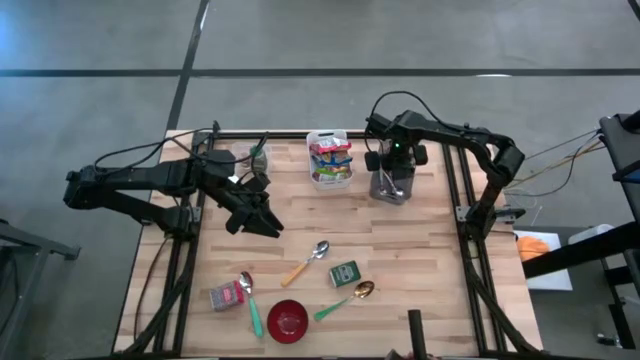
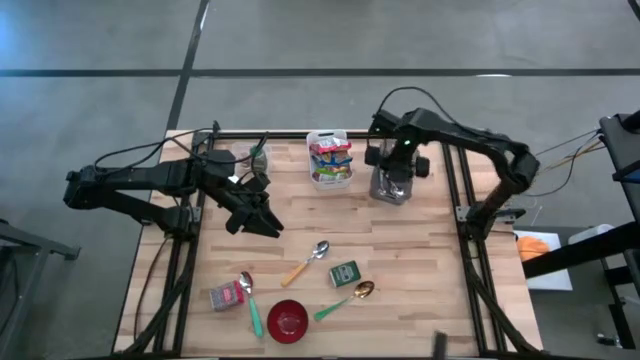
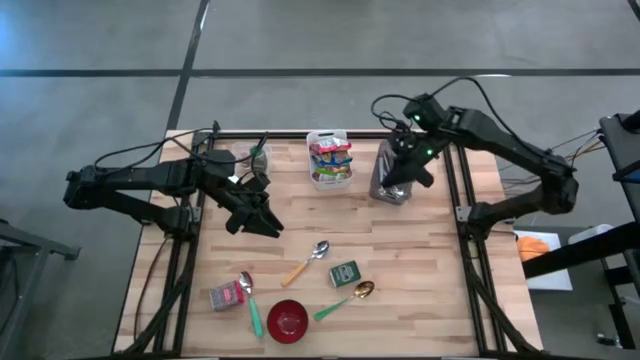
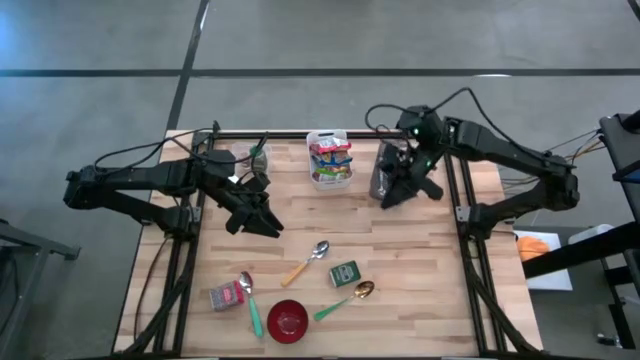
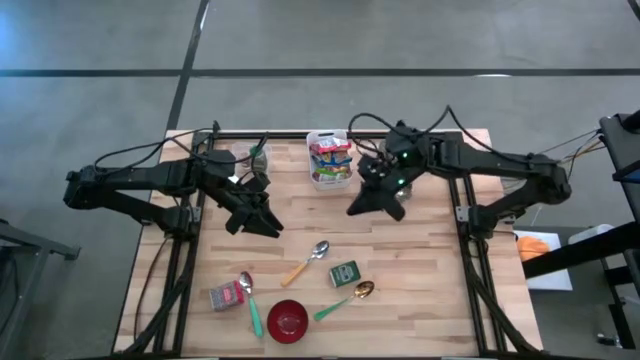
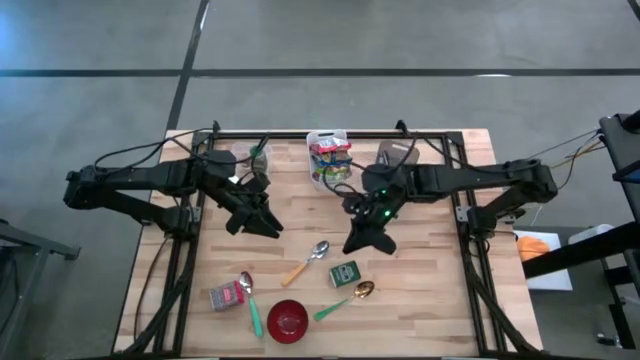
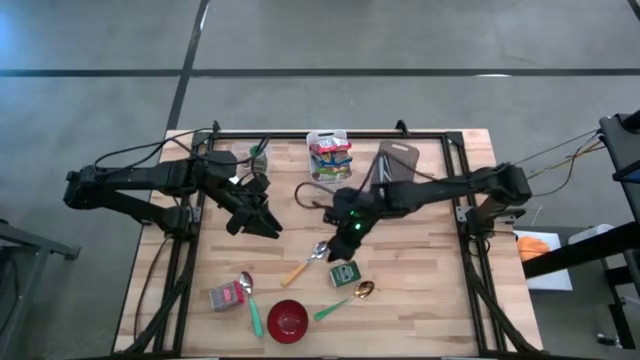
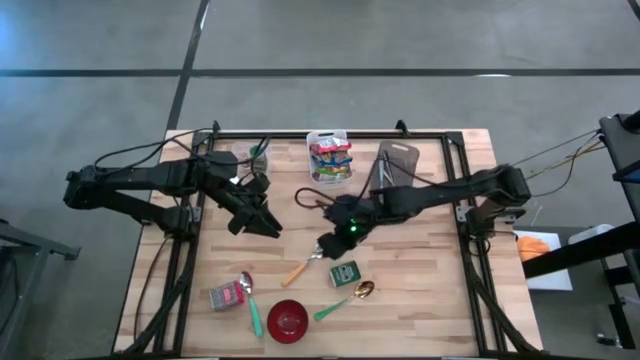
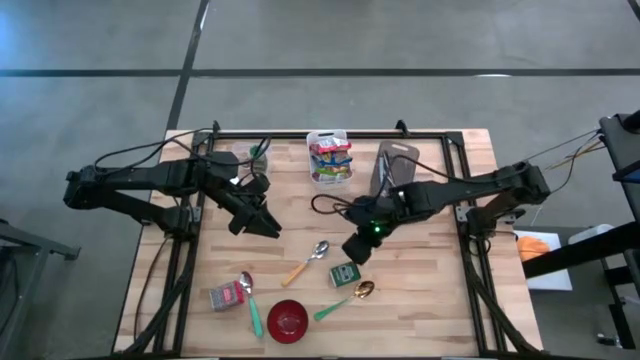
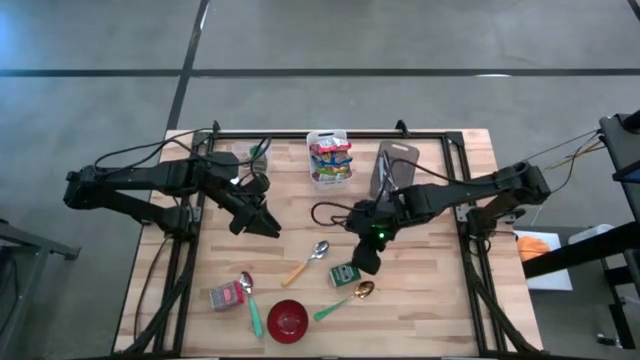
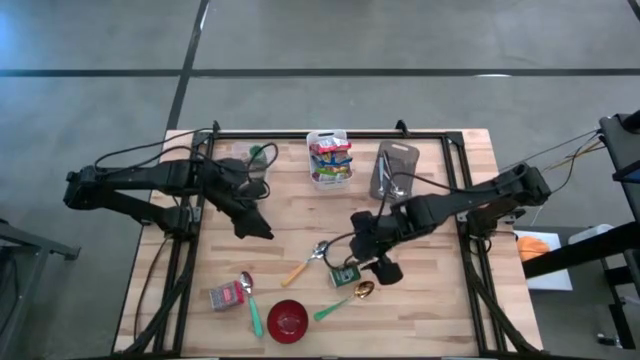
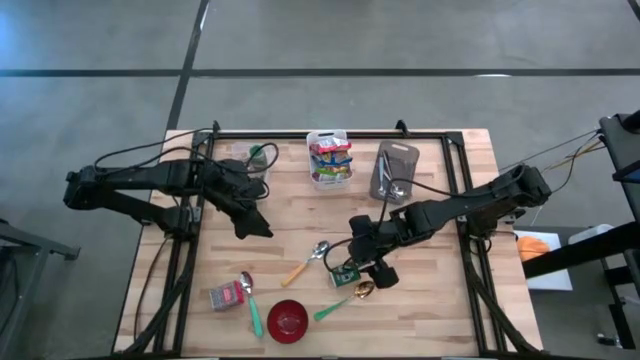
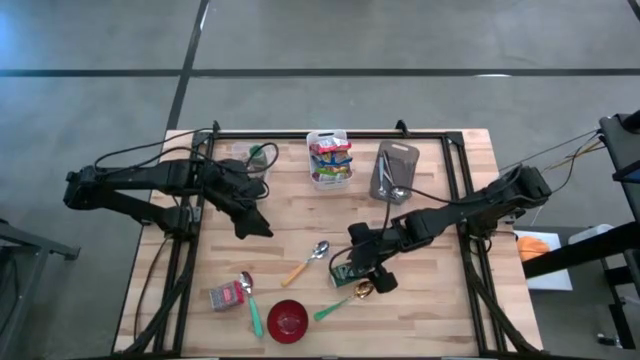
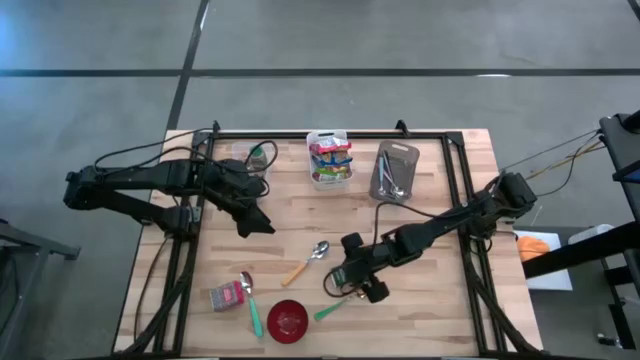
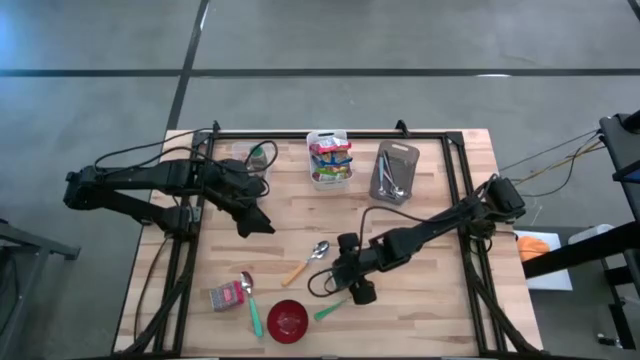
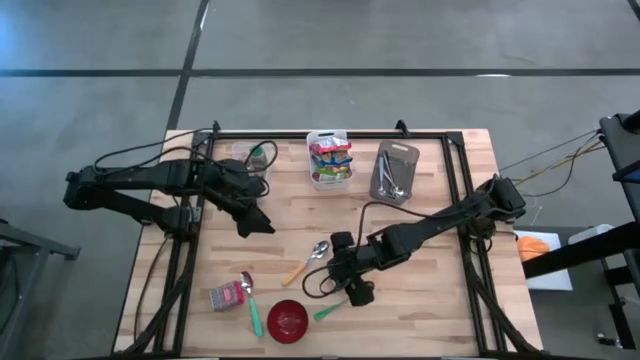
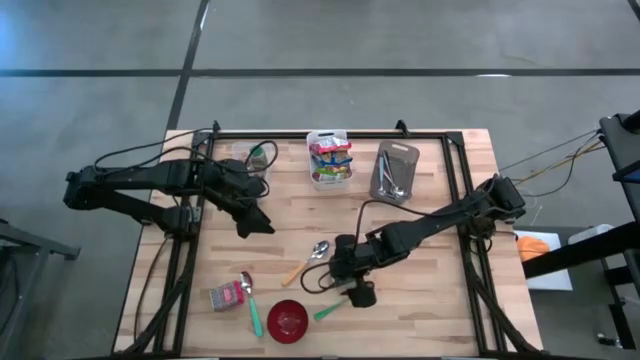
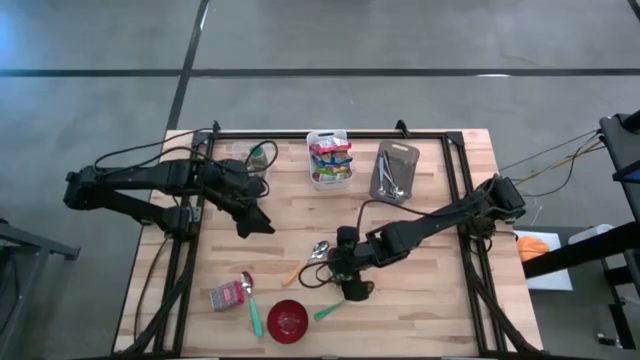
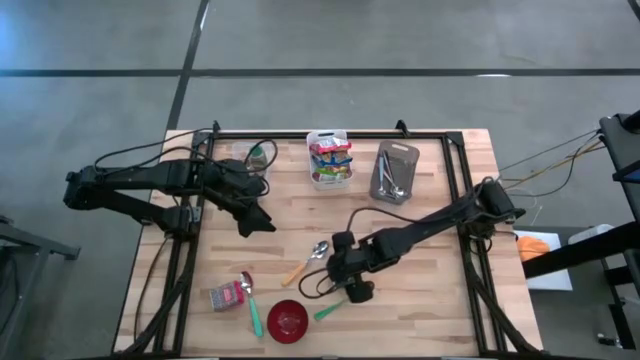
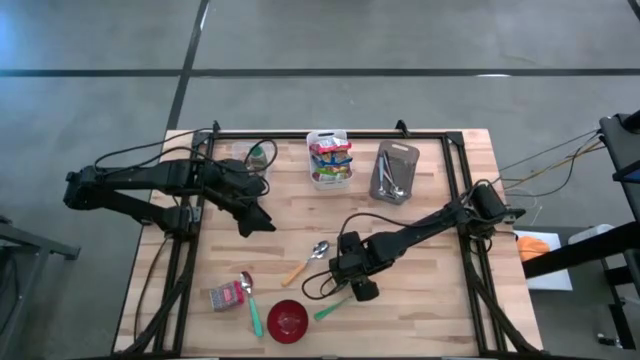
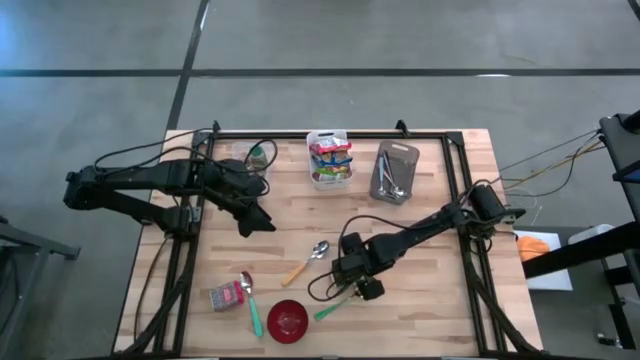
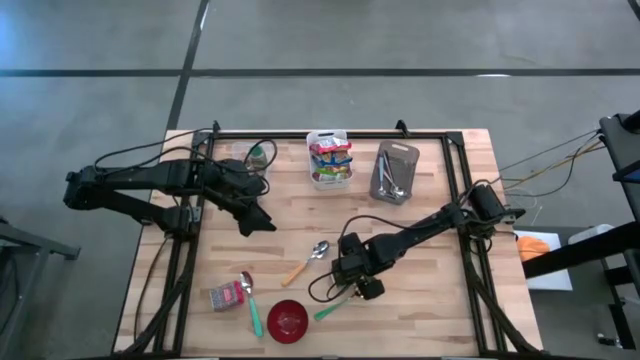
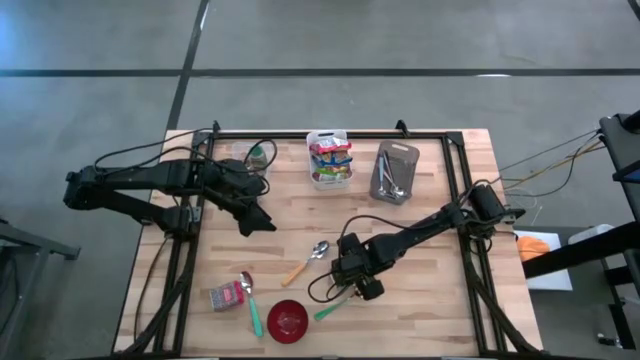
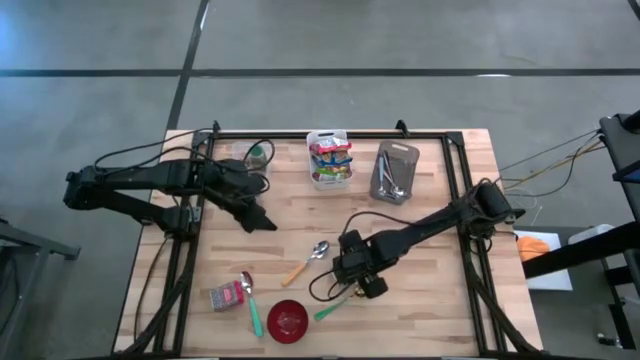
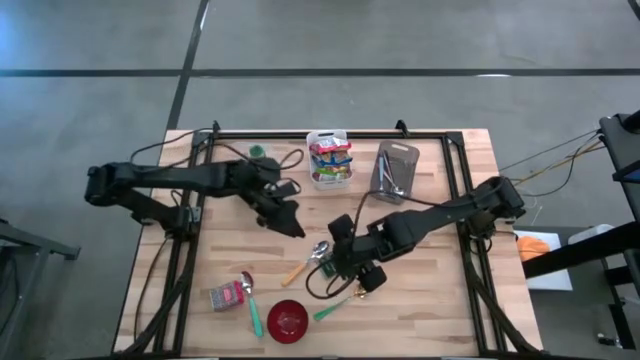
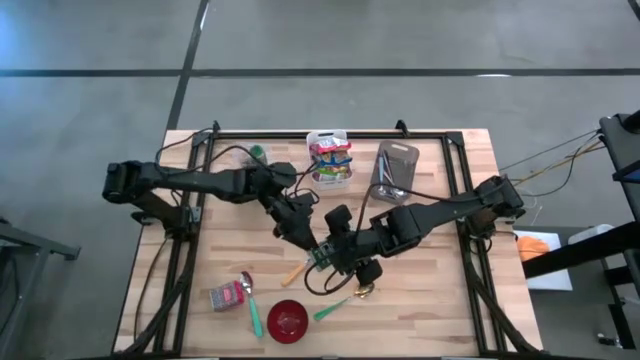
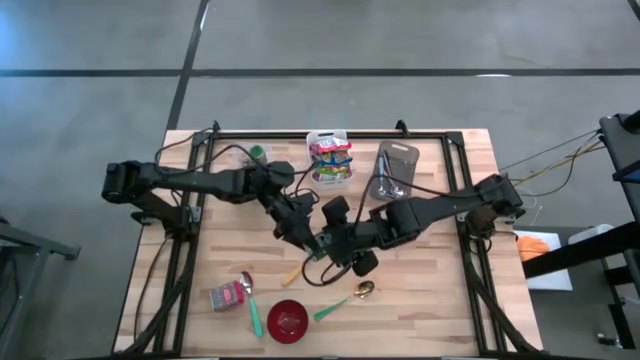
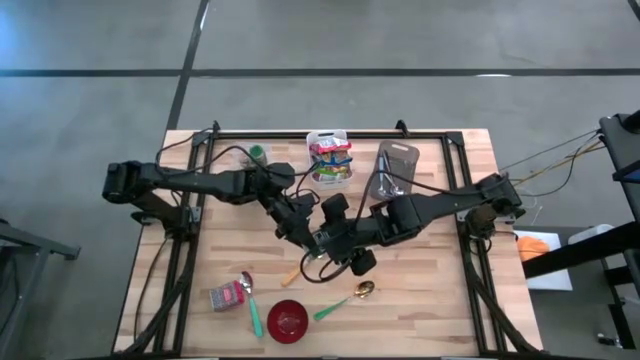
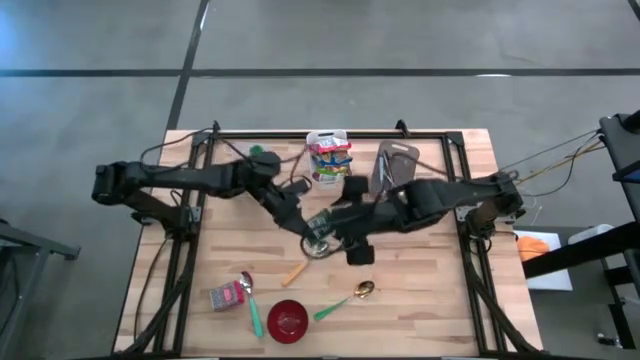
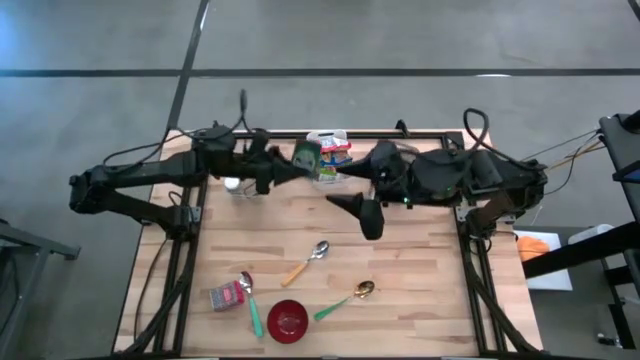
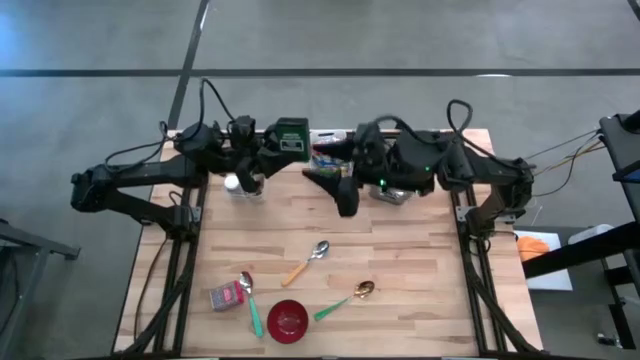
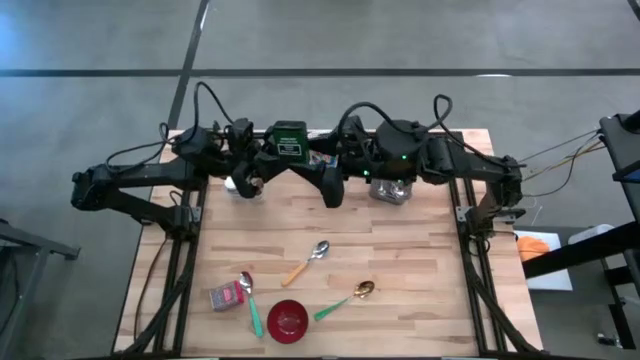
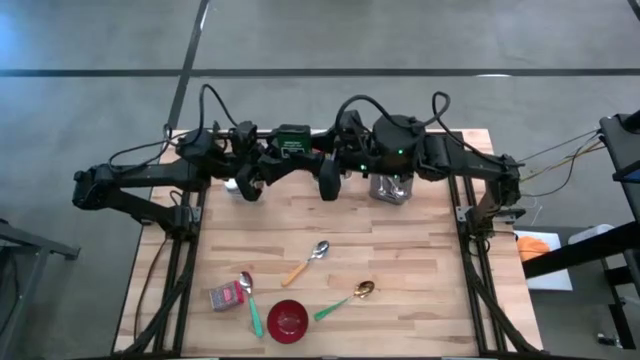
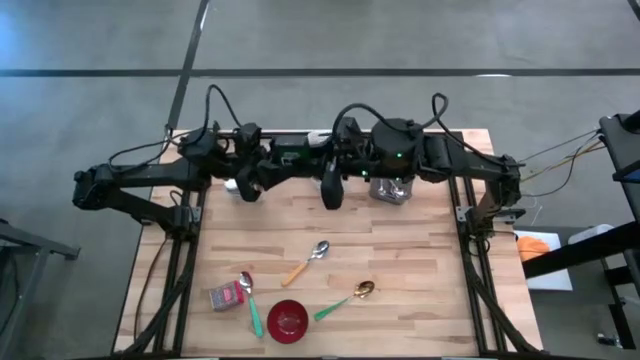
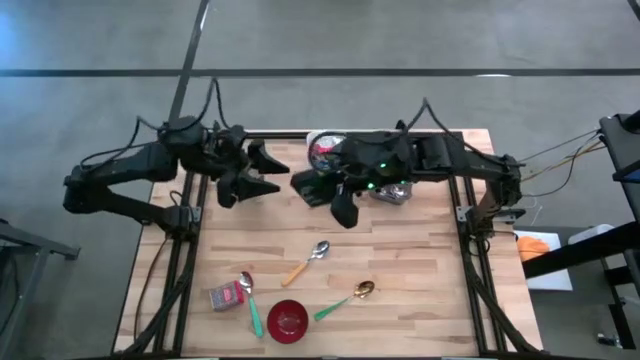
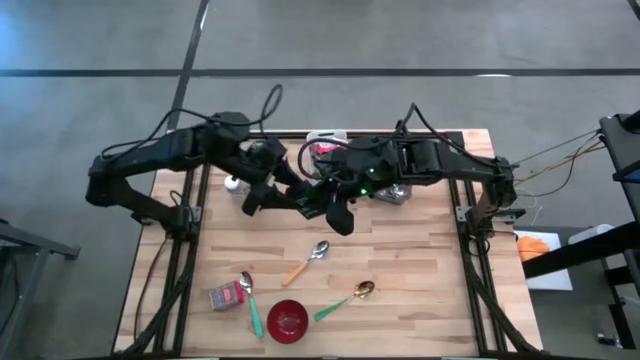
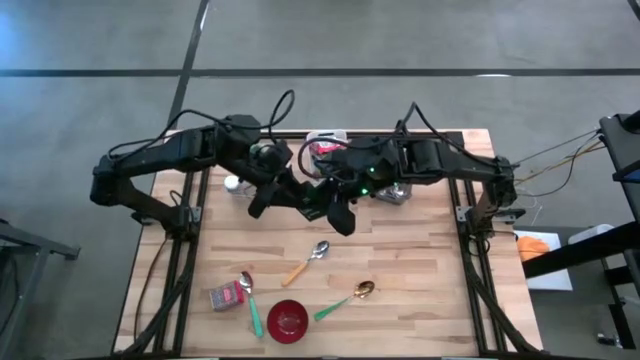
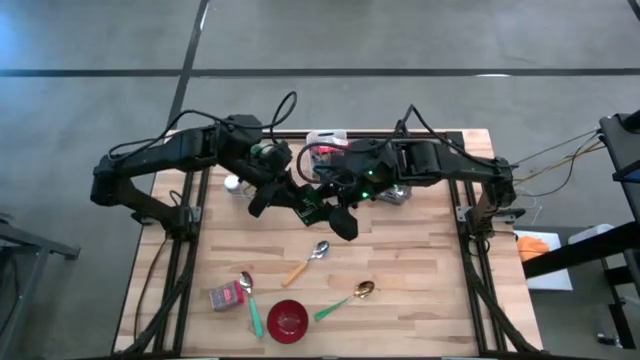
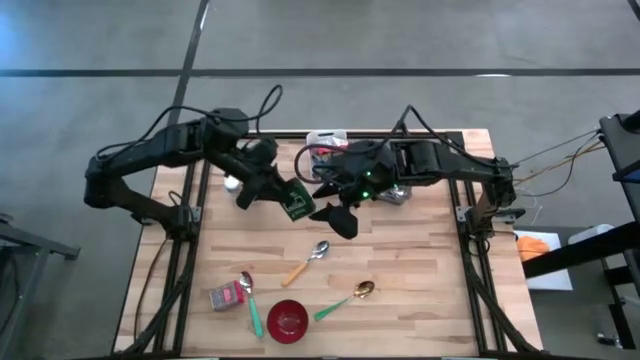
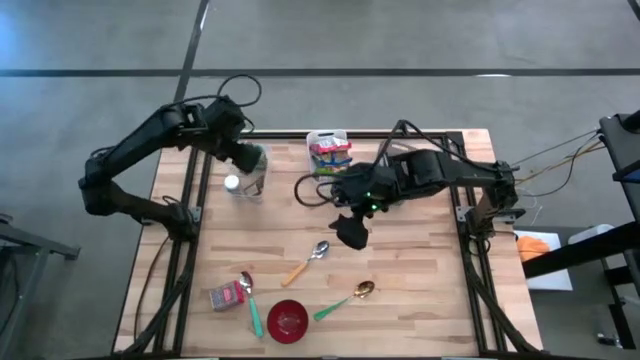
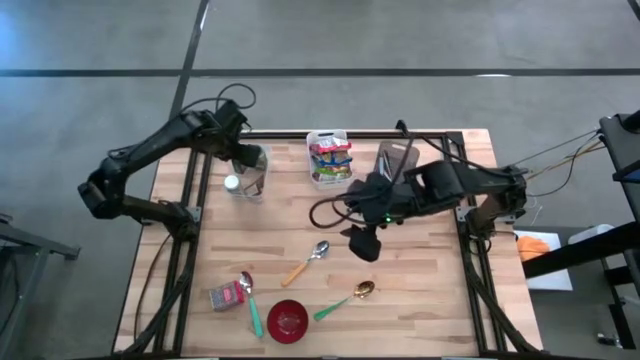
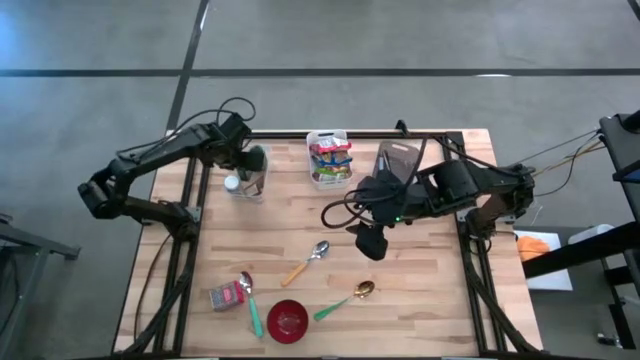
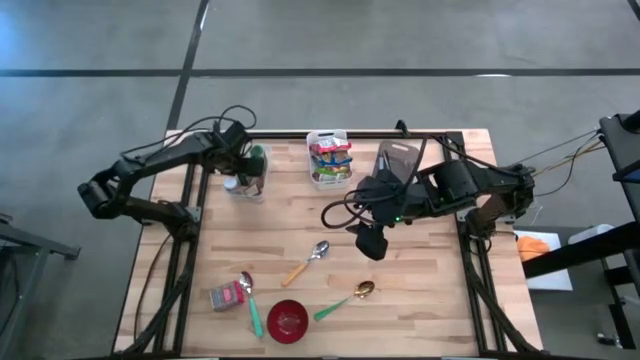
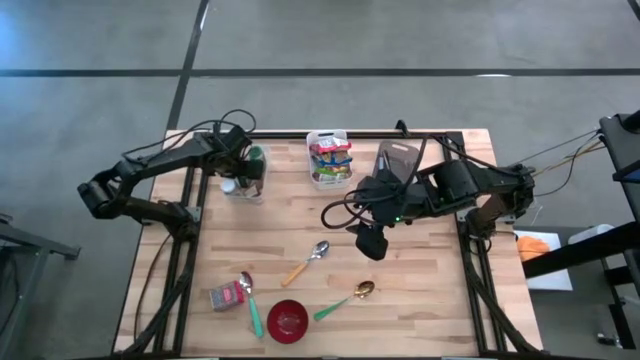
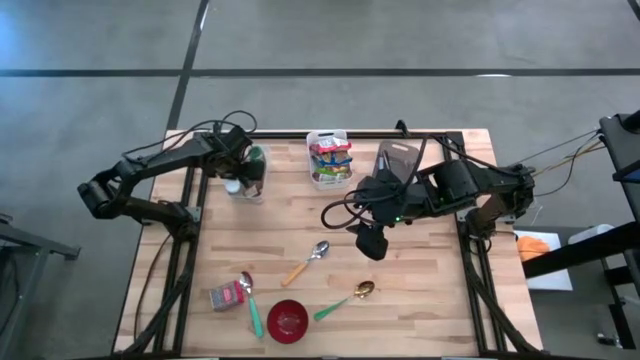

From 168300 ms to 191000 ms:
Put the green seasoning can into the transparent bin
